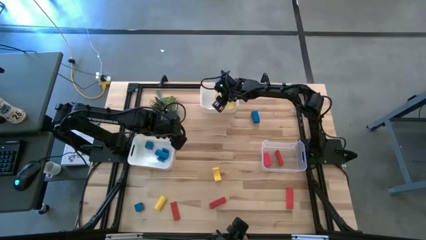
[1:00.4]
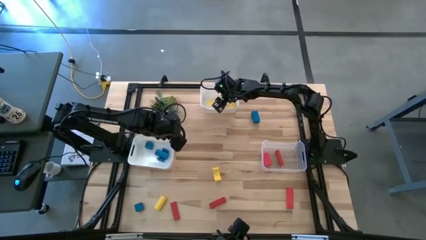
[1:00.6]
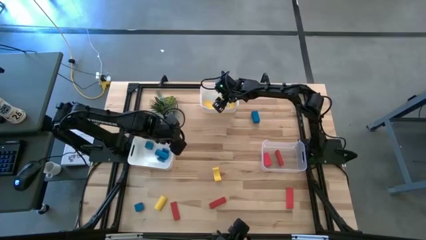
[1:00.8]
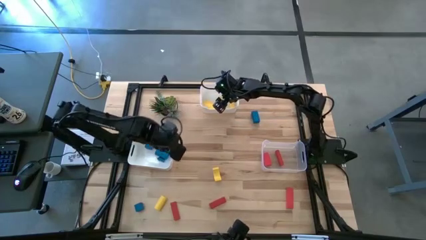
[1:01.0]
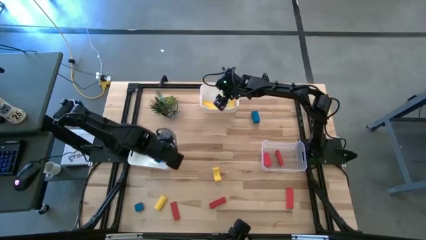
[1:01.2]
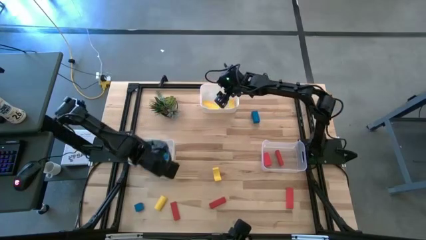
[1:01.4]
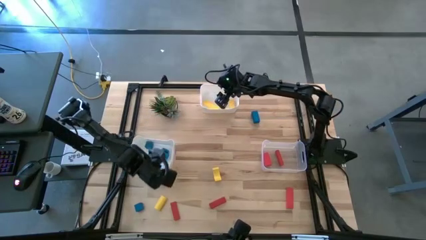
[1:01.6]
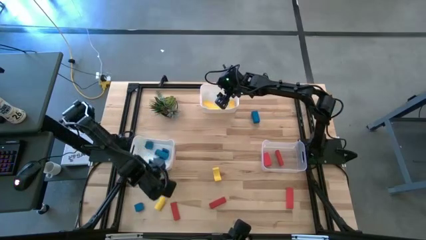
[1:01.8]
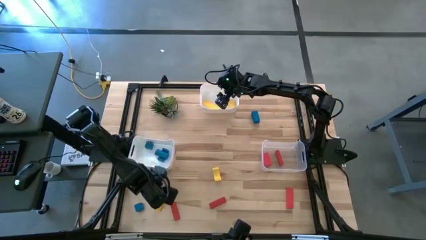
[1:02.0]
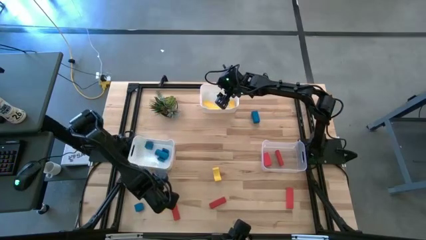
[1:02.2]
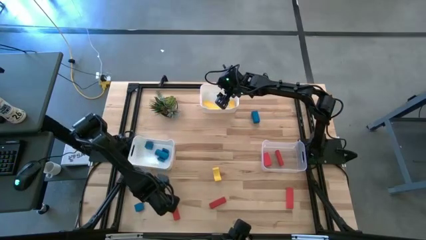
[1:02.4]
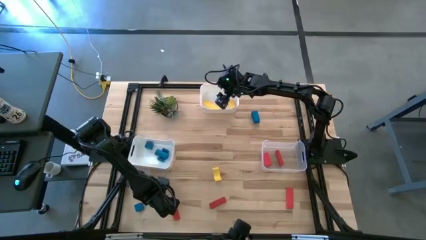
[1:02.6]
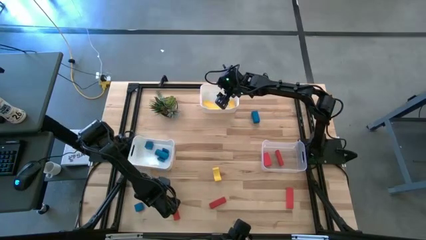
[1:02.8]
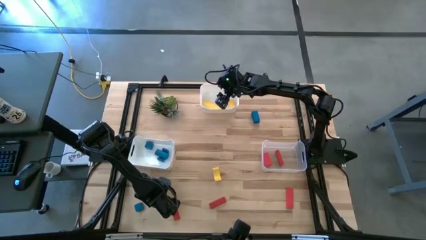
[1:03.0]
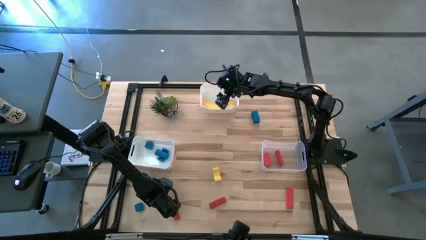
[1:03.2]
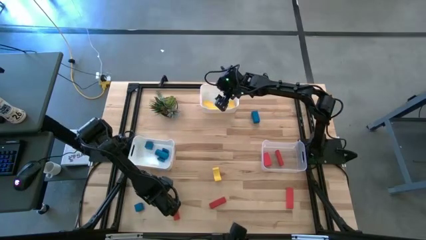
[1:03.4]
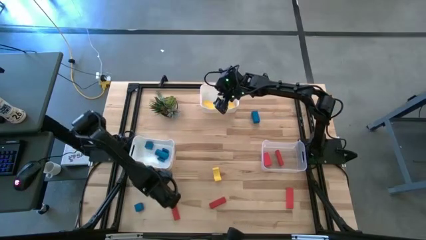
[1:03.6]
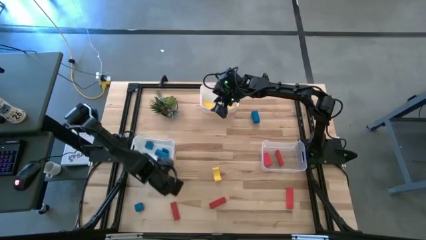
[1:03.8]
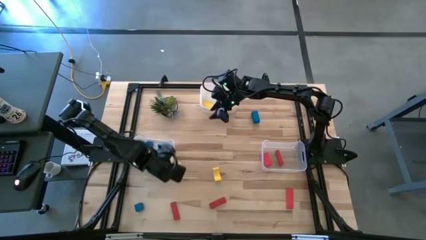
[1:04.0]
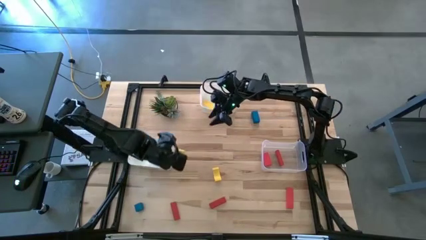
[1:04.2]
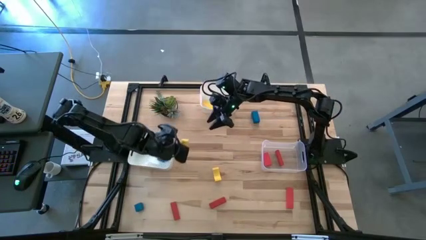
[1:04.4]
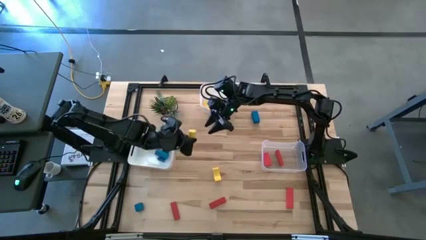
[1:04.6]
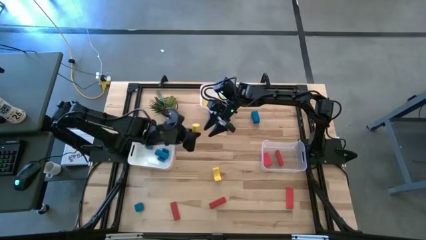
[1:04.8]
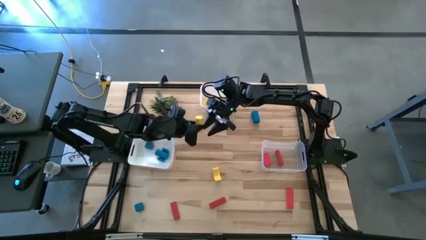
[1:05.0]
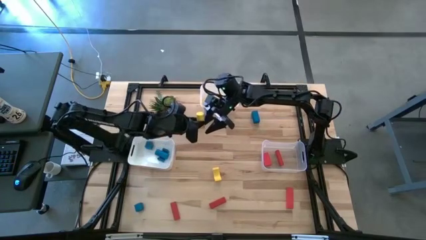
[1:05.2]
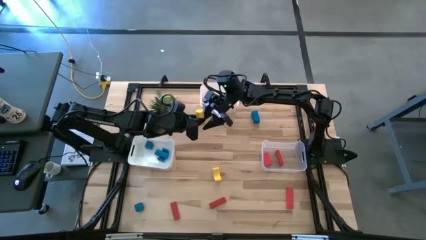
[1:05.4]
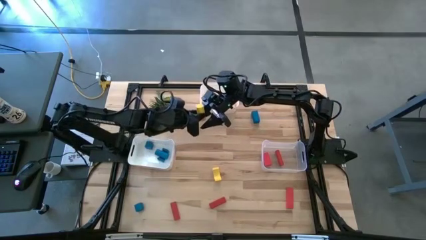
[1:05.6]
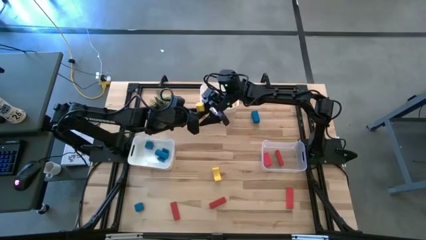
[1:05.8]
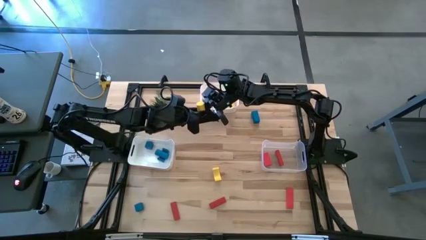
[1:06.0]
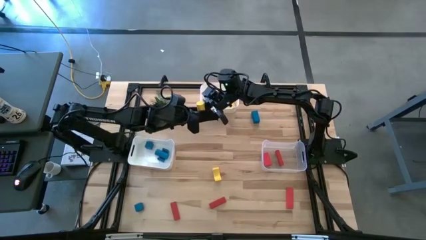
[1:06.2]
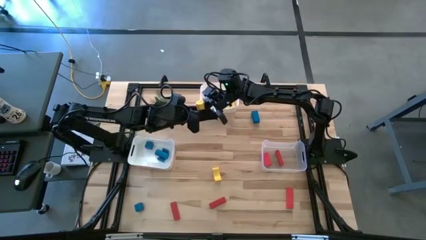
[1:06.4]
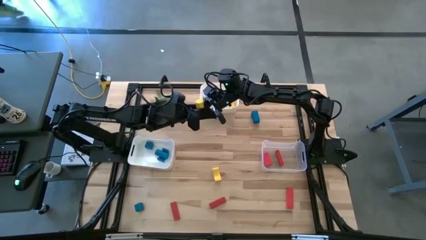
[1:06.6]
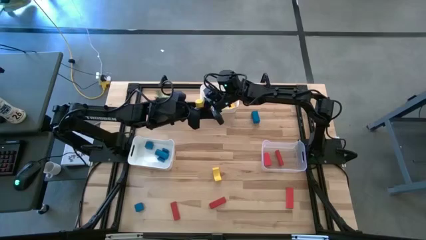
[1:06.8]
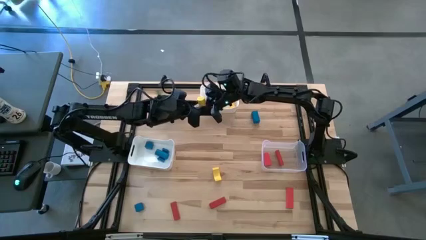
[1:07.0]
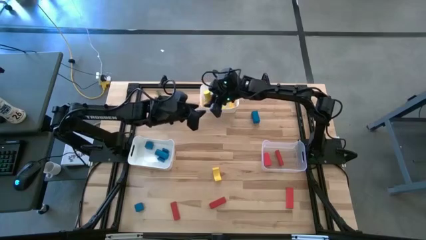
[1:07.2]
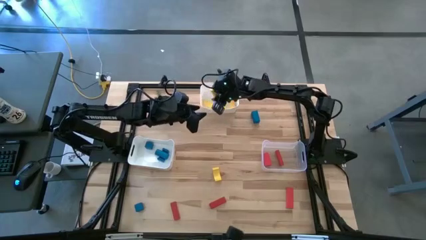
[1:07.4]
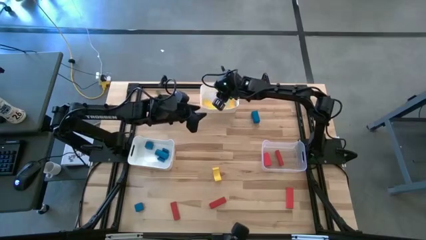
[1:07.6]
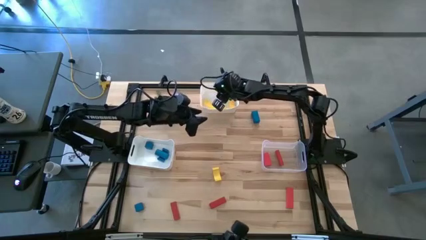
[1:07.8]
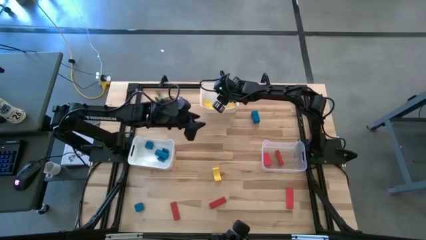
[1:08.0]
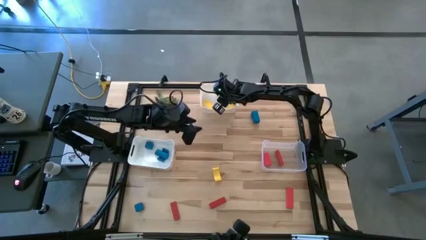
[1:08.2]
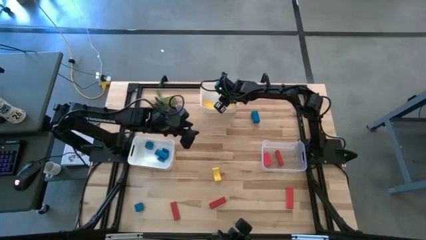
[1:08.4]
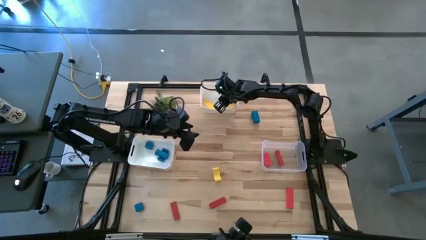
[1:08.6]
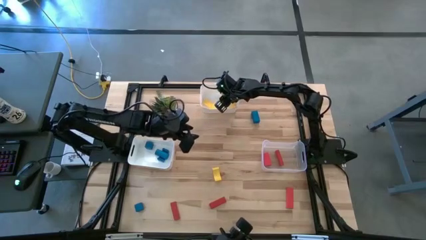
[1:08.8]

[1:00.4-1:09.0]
Task: Sort & place blocks by color
Put the bottom left yellow block into the top white bin

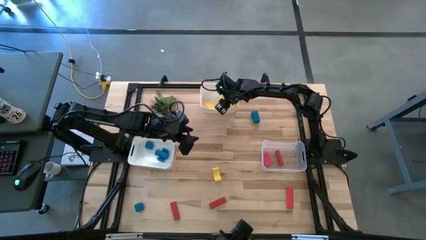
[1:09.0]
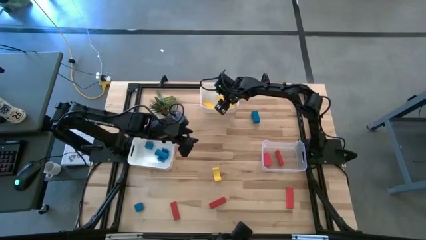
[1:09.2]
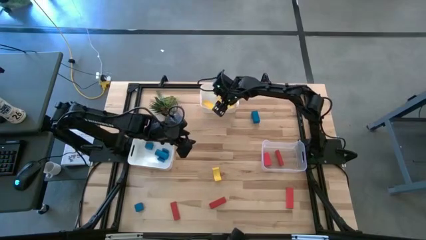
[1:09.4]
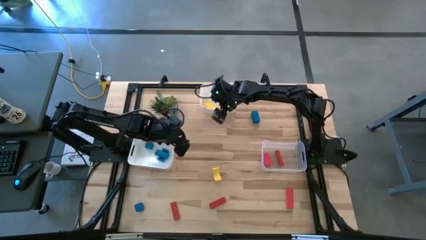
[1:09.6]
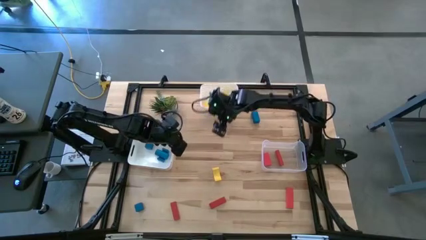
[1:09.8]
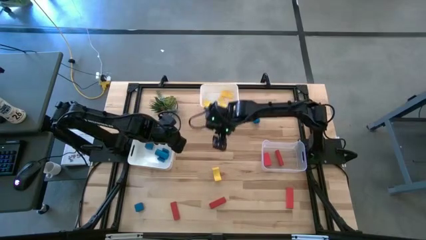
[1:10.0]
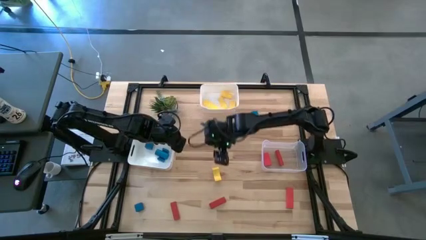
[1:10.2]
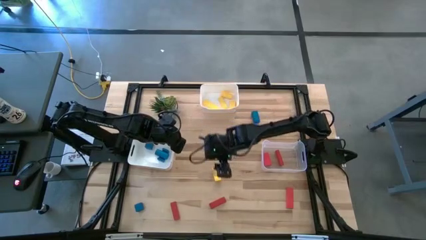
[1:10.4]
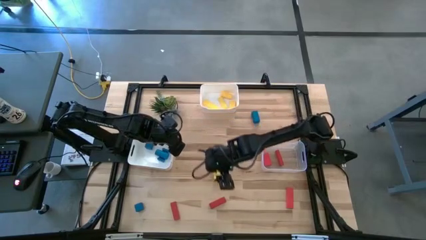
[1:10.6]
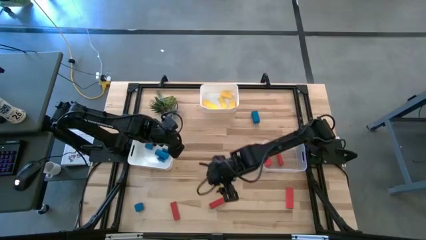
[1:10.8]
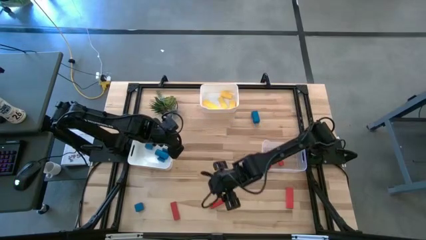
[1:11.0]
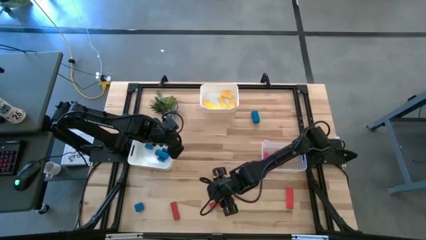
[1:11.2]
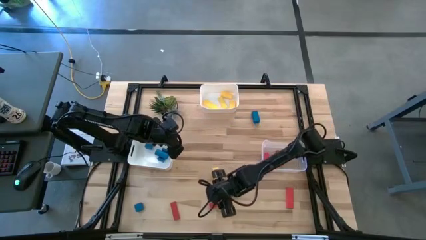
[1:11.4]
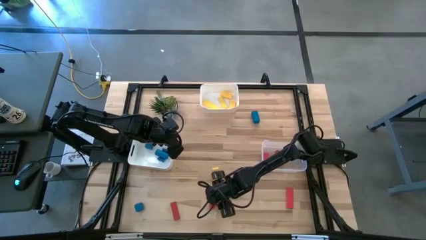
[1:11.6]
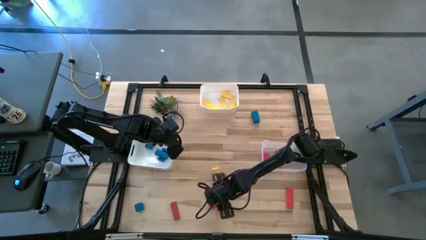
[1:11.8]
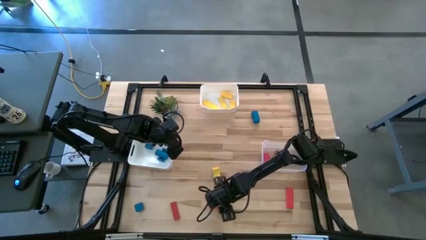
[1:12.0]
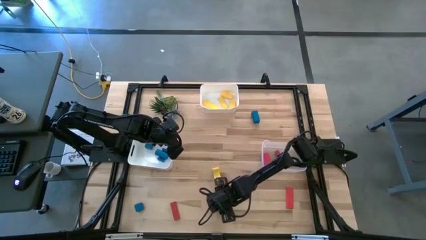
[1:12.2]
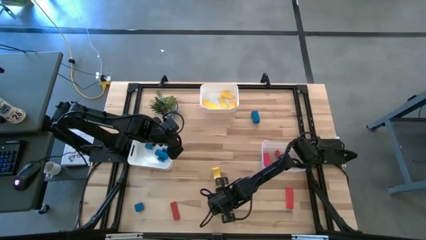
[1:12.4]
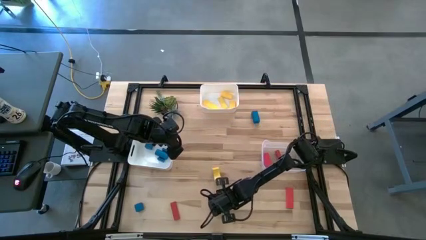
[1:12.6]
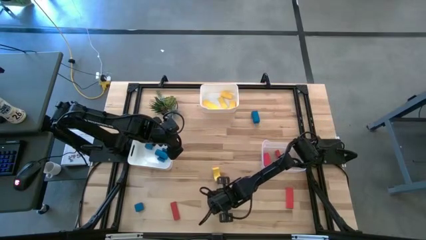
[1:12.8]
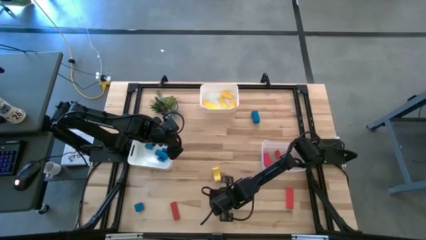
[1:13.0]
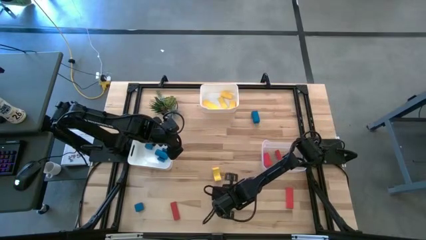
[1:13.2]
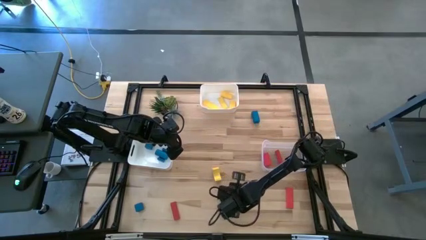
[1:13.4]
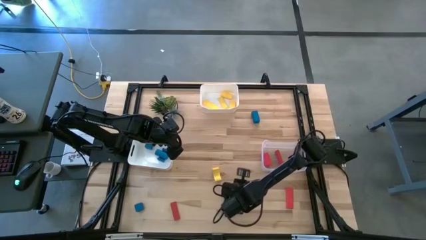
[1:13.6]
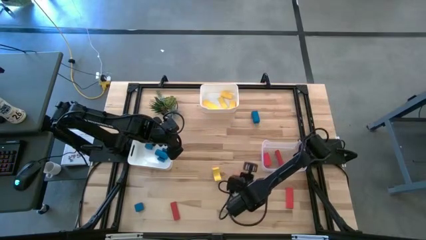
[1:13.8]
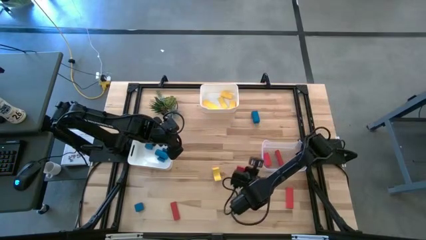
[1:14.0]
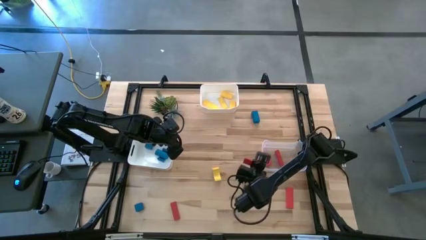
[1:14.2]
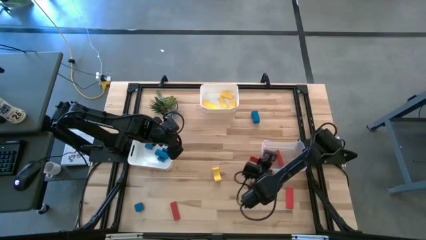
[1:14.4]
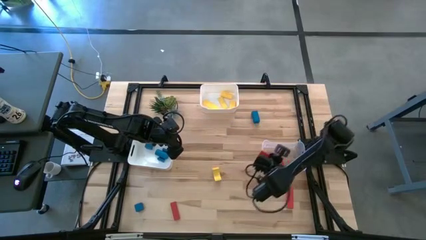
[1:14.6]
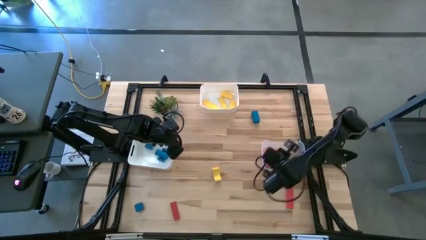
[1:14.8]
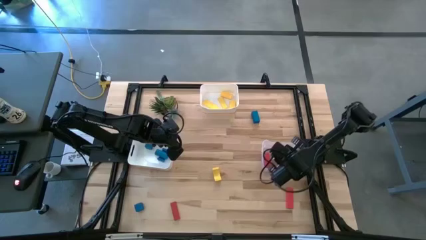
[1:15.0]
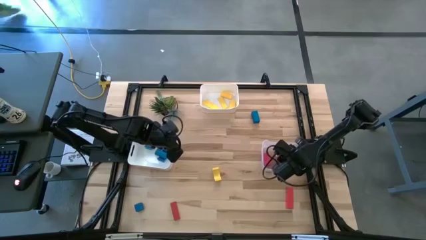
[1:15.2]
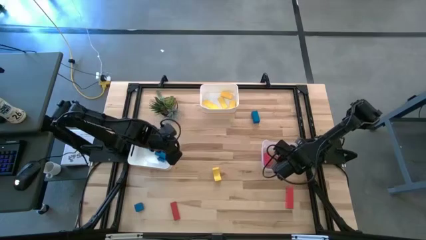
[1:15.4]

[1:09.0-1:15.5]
Put the bottom center red block into the bottom right transparent bin

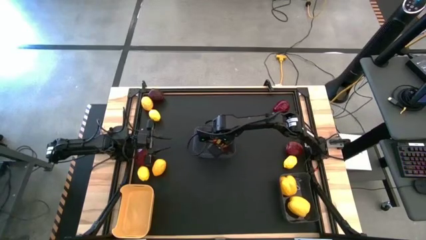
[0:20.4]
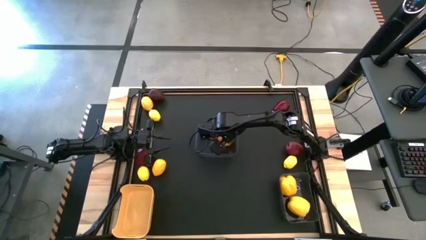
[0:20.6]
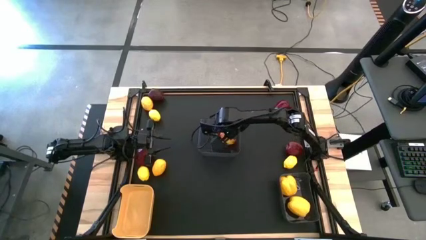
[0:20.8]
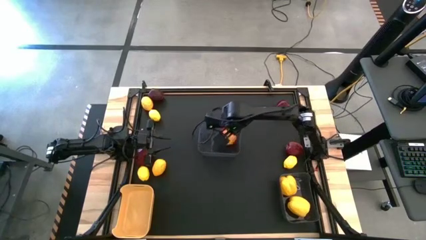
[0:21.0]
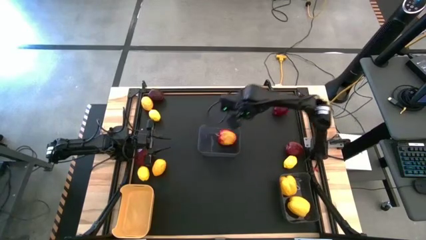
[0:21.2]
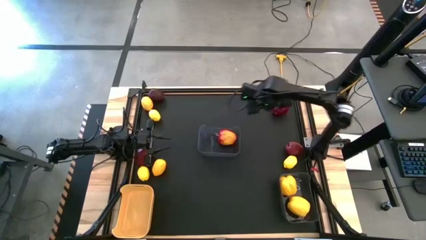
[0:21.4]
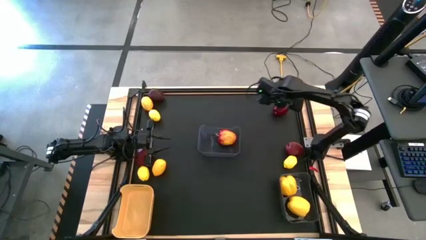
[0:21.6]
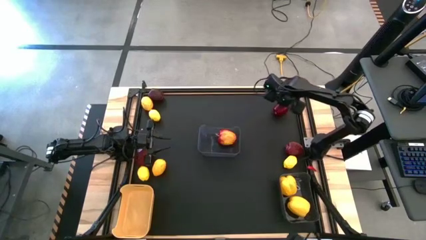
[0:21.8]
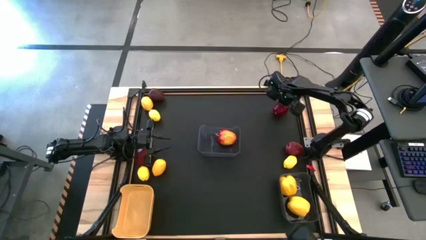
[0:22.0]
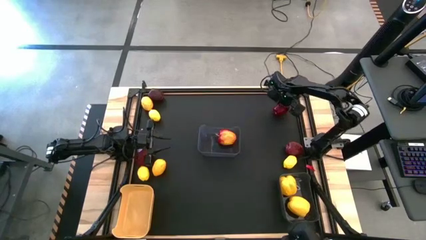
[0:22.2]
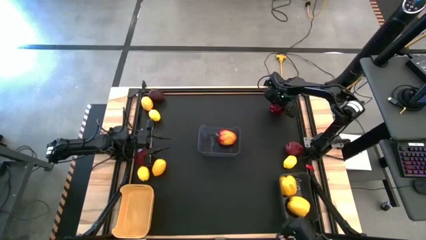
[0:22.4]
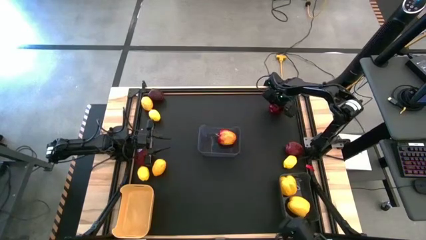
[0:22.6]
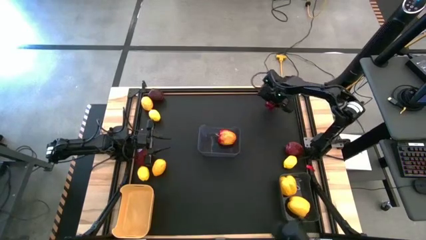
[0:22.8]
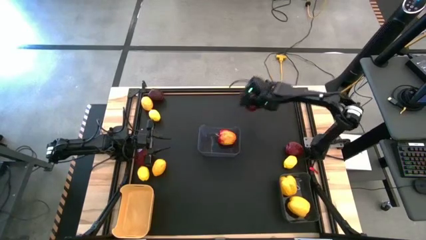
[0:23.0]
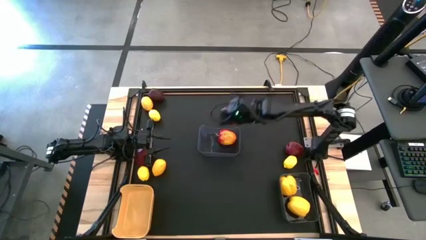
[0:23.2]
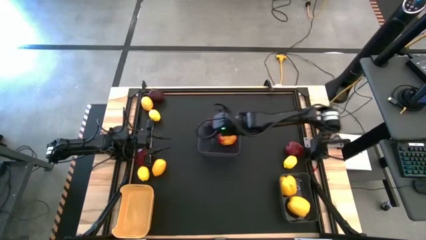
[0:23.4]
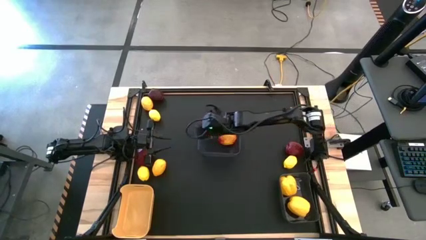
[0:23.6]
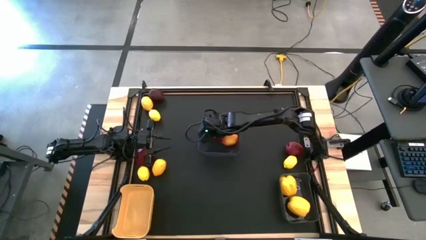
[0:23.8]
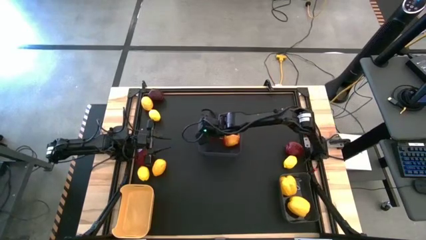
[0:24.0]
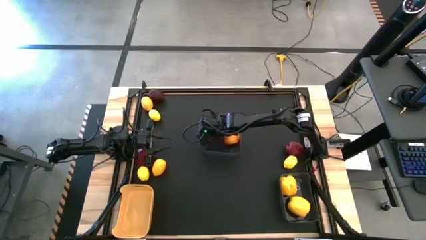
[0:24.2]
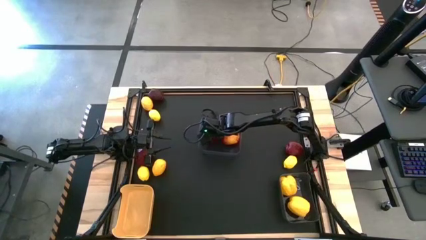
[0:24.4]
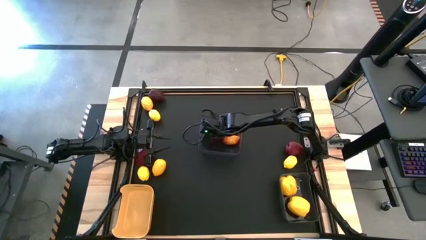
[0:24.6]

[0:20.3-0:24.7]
Task: Sort produce into baskets
Put the red apple into the top black bin
